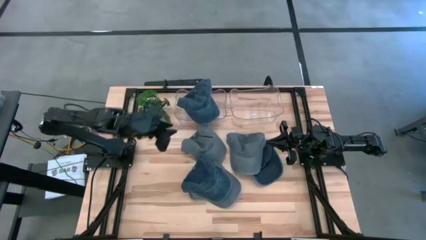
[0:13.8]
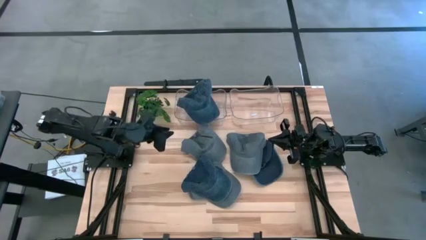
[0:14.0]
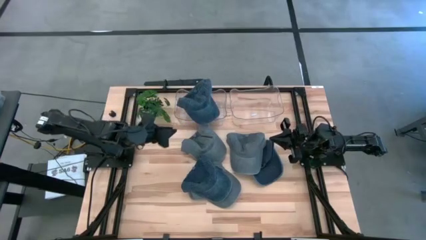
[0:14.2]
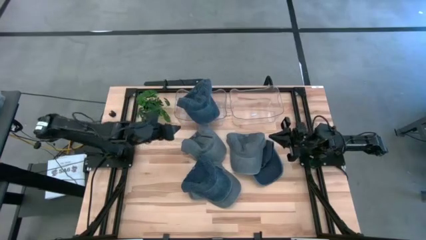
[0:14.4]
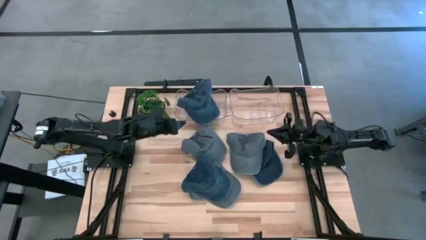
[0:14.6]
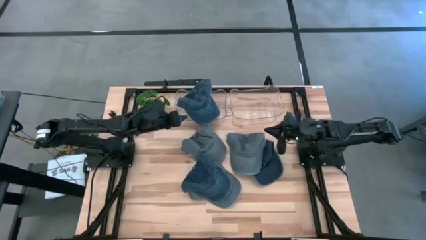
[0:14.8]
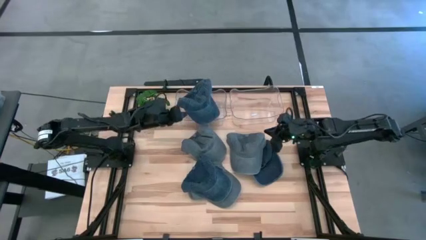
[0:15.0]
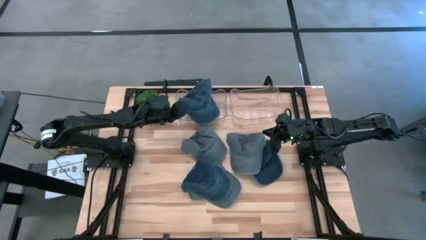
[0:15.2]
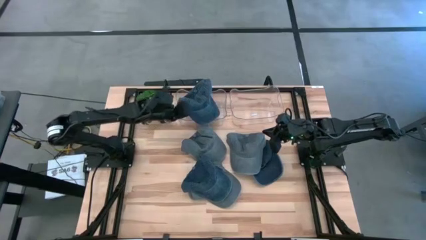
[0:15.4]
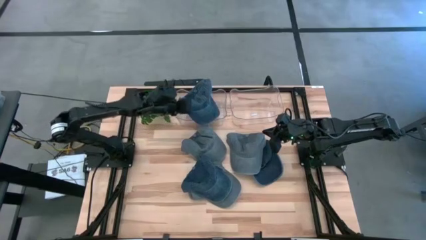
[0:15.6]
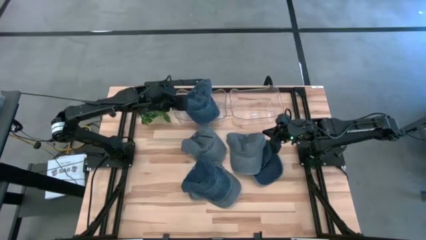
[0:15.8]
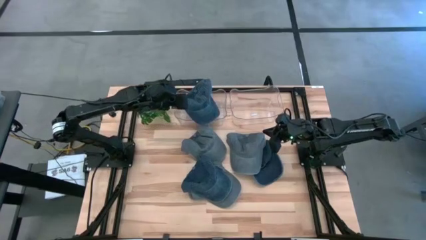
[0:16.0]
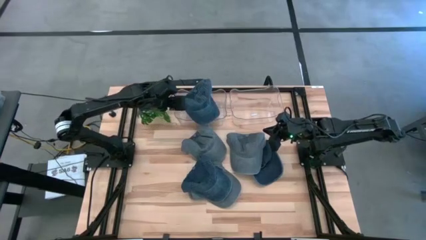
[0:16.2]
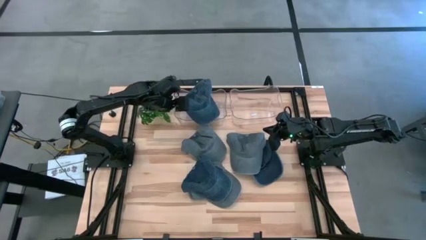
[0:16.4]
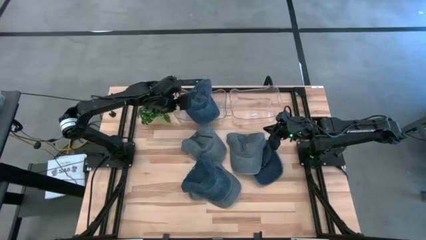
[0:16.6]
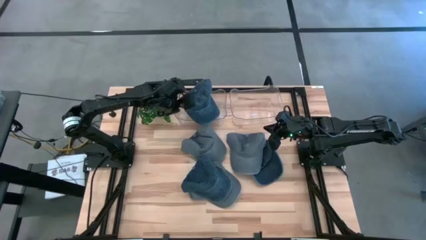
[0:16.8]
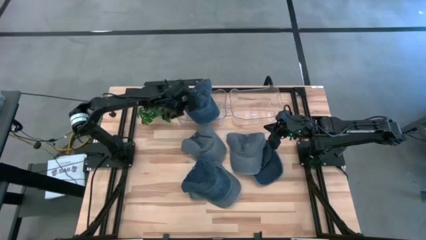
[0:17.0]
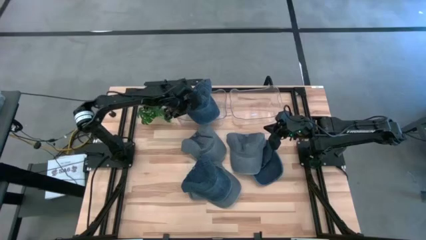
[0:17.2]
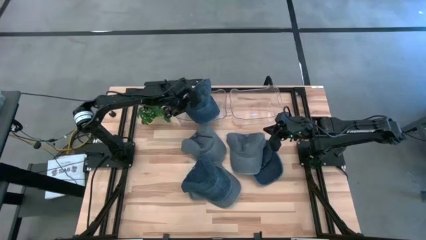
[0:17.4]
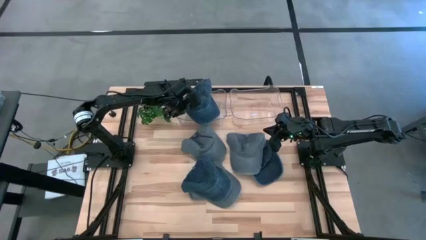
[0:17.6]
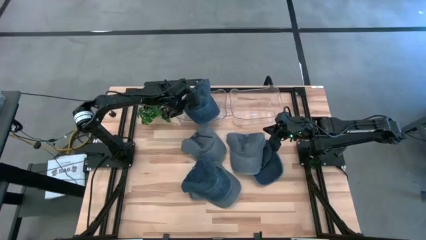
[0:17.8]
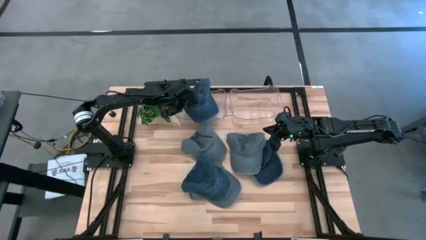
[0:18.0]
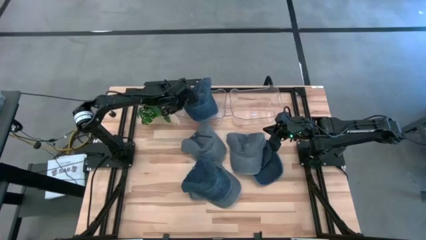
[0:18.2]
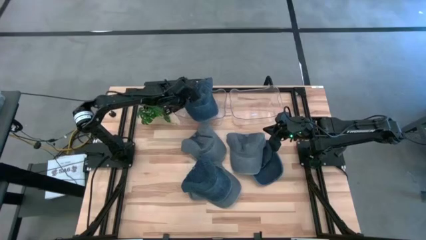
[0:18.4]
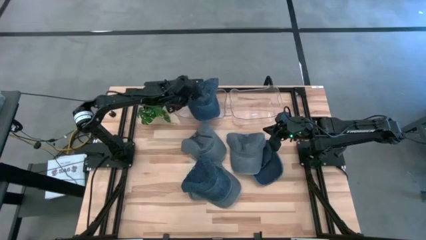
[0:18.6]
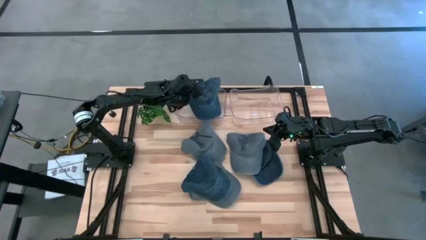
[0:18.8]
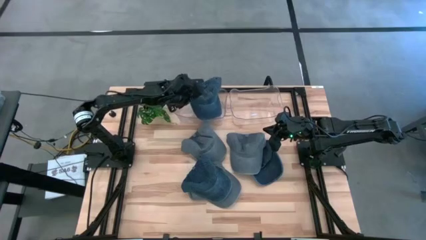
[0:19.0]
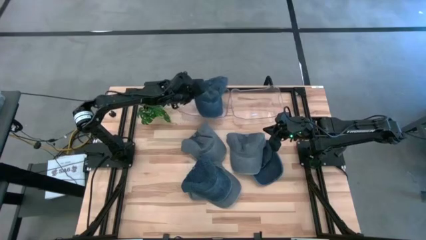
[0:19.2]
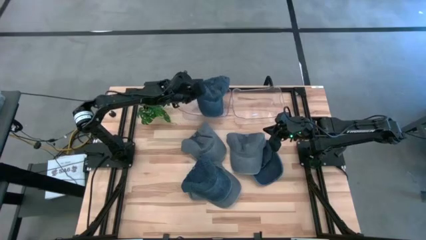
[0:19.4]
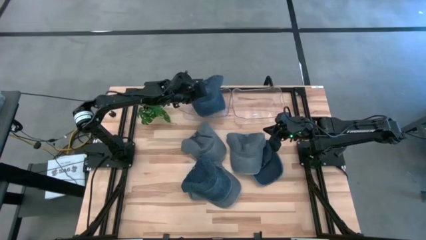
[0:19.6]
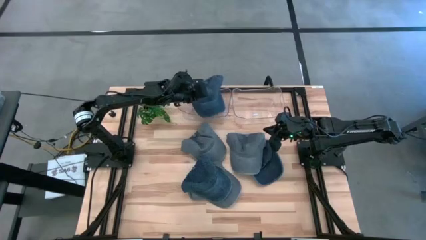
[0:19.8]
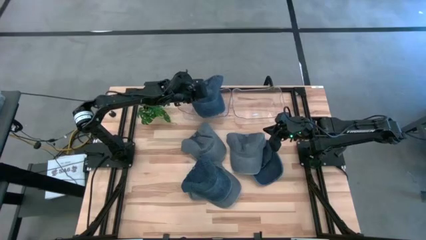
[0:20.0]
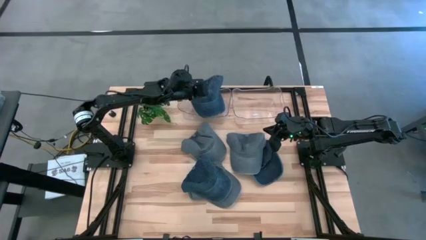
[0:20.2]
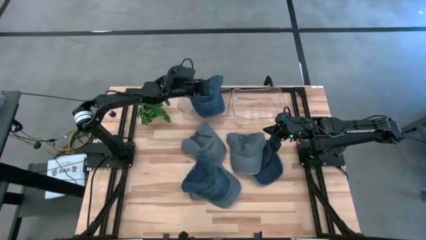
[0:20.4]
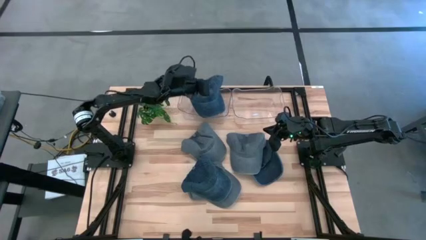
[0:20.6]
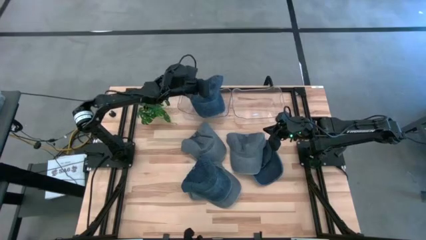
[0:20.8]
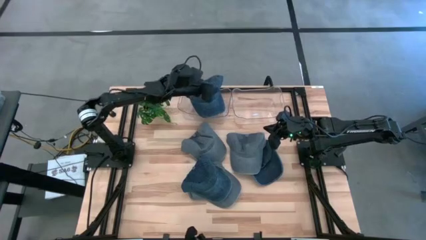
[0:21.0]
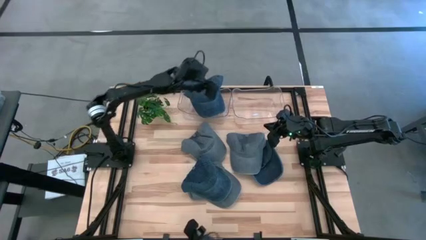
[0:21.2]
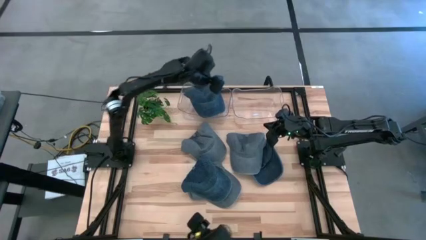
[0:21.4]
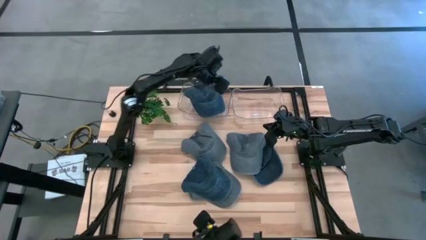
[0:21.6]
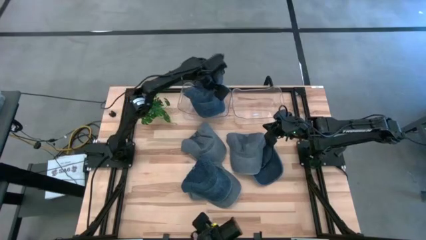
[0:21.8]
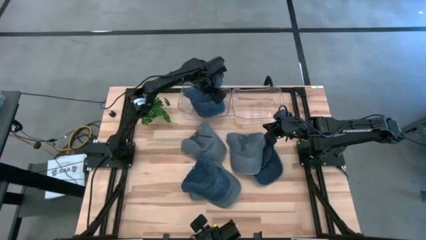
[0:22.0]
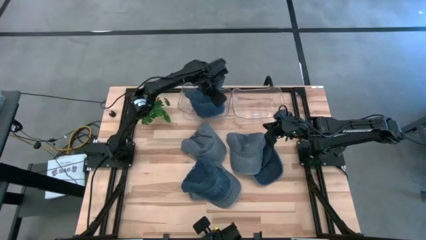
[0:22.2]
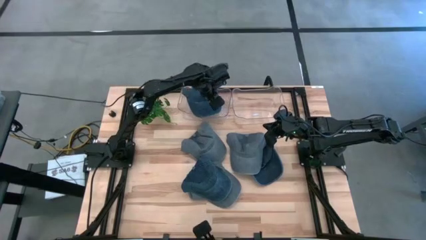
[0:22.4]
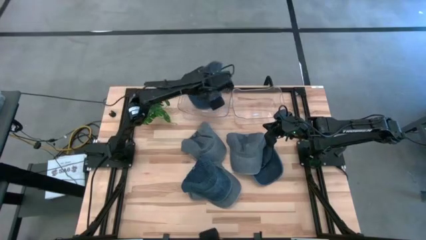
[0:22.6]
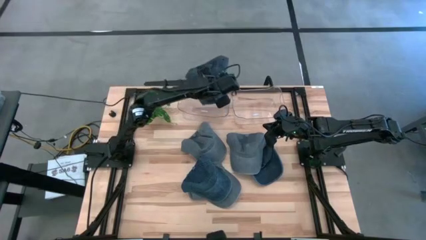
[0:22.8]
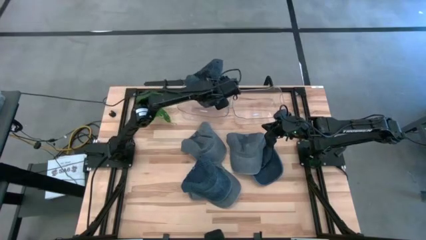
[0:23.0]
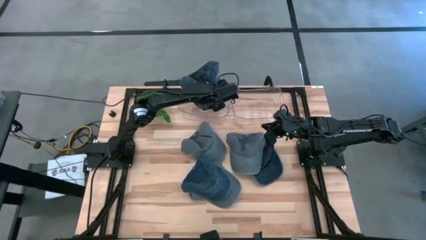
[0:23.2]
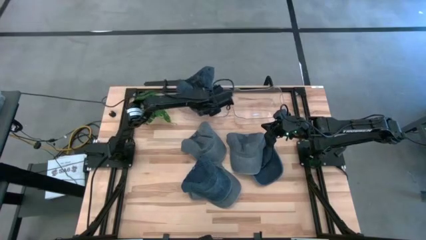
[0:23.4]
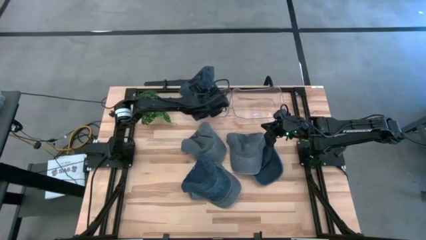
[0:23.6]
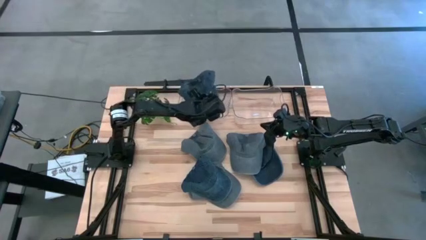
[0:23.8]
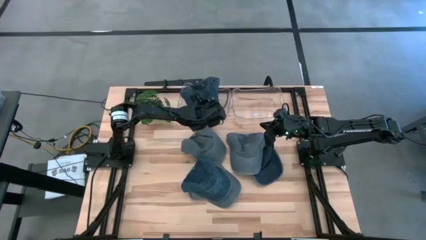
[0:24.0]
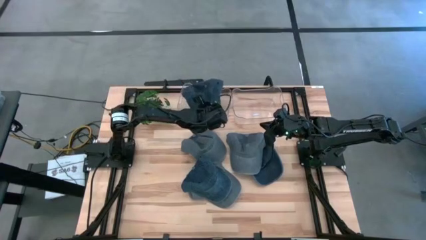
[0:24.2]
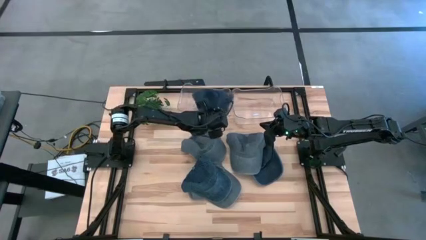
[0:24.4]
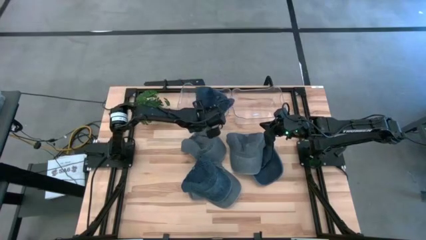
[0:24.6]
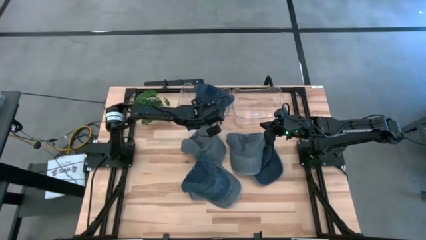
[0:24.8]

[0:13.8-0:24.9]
Task: Pick & Place hat
Put the top left blue cap into the left transparent bin

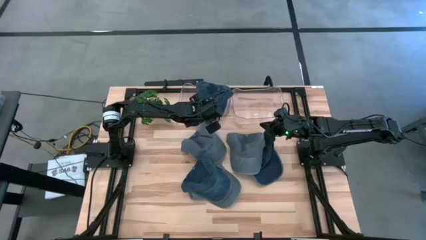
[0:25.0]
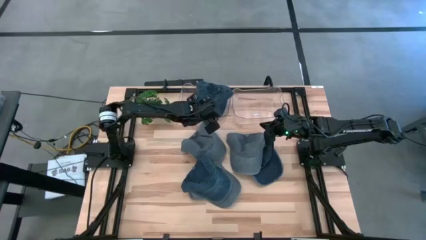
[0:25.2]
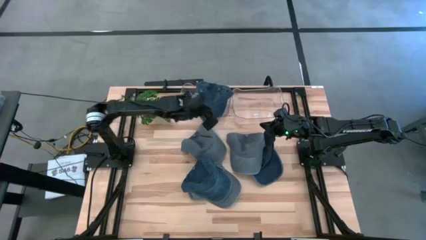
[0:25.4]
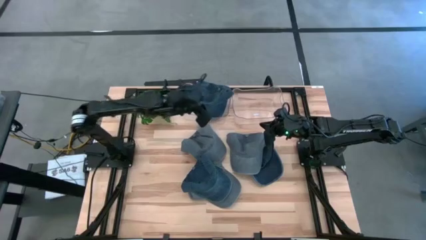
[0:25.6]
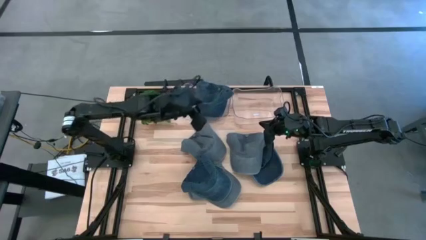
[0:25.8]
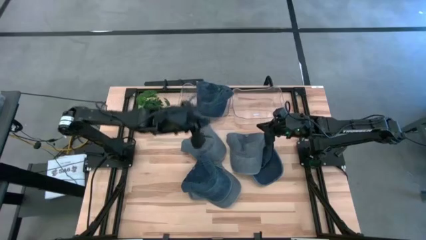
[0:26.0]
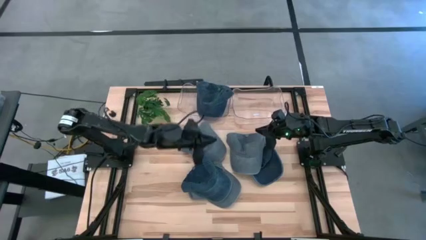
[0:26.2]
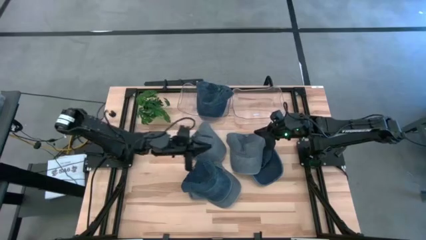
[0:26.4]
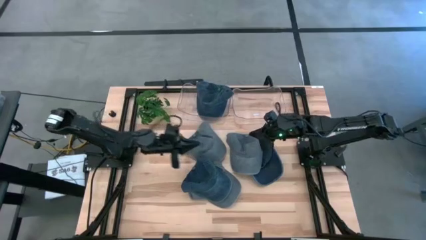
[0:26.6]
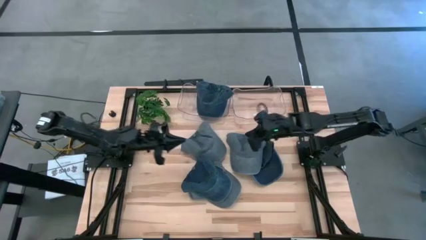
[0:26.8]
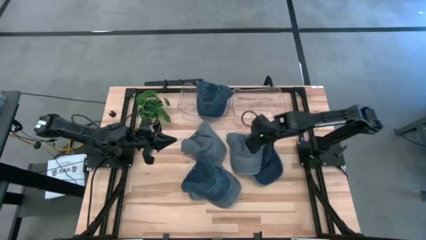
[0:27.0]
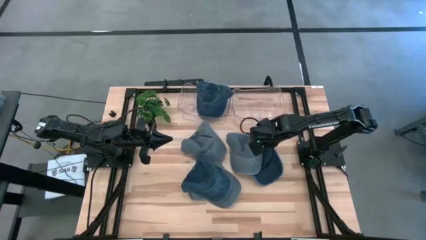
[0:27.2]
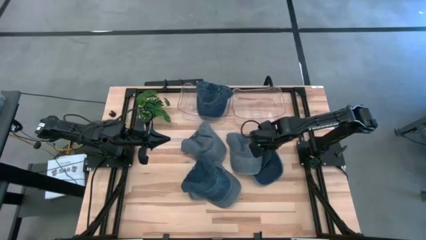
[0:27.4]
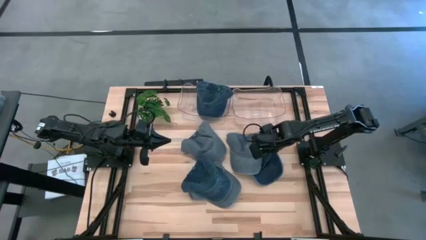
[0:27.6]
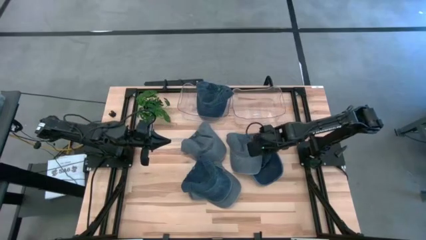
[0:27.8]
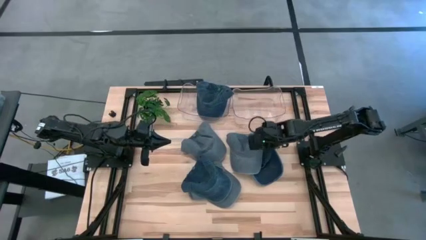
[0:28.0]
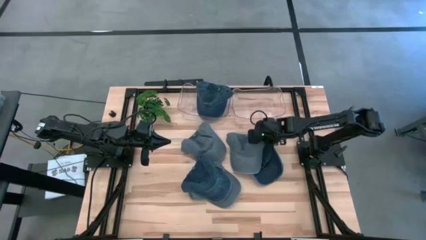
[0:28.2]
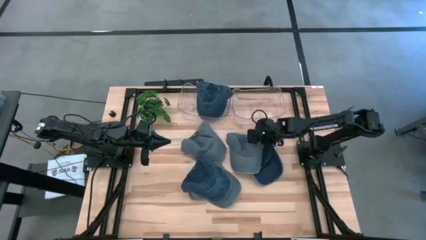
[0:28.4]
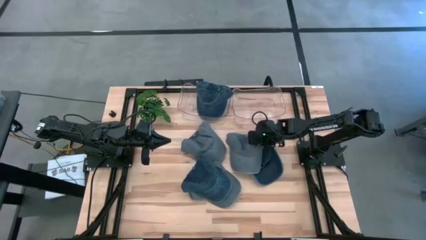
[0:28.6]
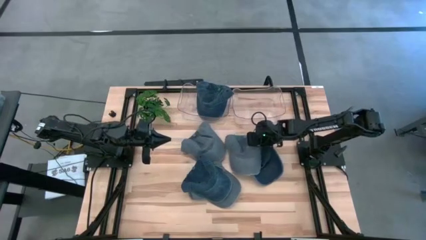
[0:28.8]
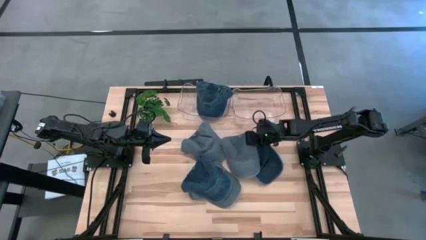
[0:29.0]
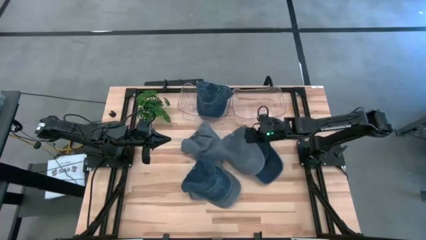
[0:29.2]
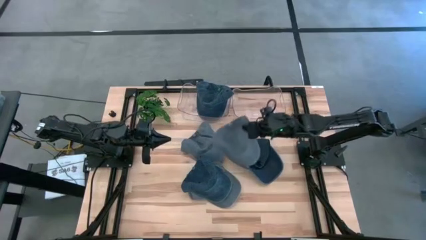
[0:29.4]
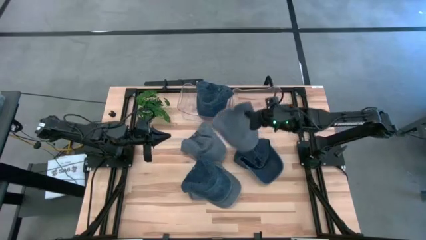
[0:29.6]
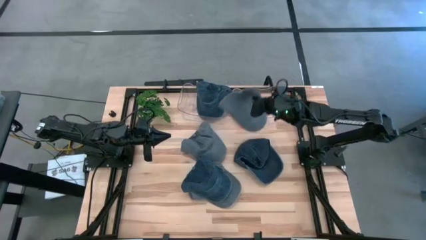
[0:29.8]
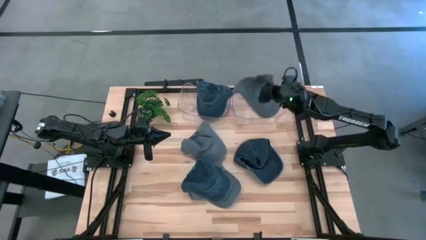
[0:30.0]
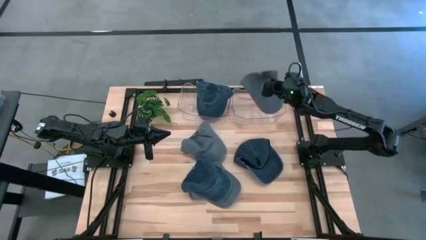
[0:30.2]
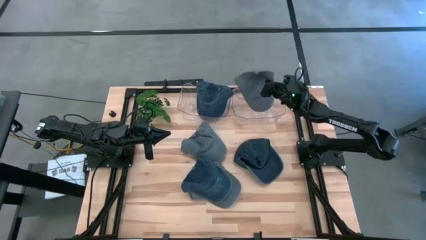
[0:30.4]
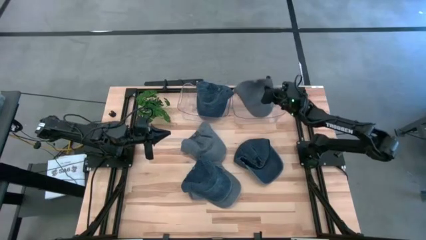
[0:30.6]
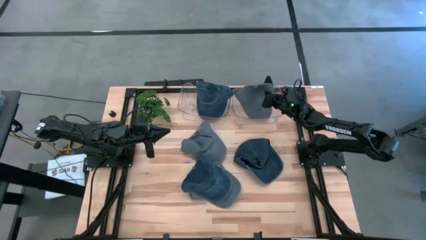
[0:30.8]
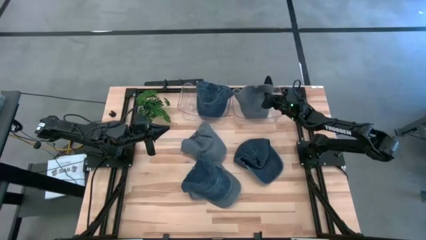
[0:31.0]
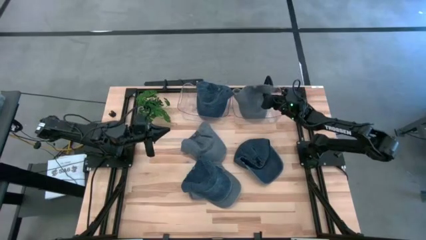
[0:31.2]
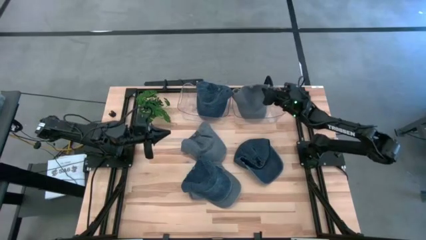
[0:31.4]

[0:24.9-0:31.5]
Put the top right gray cap into the right transparent bin
